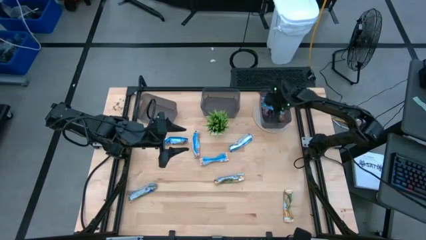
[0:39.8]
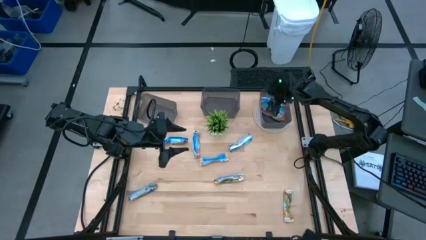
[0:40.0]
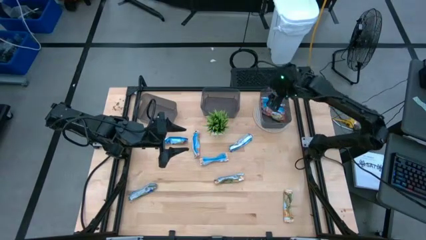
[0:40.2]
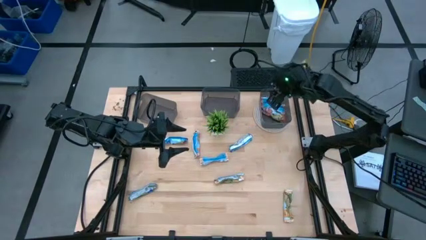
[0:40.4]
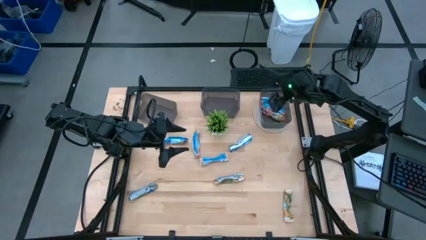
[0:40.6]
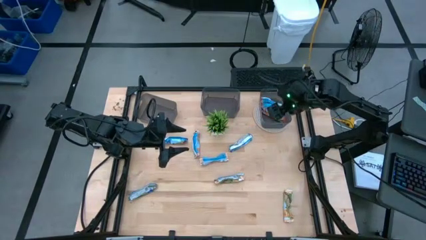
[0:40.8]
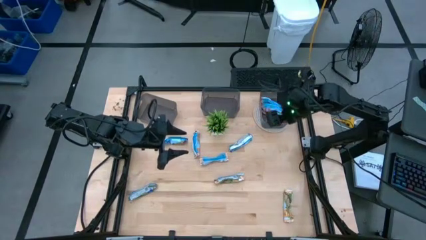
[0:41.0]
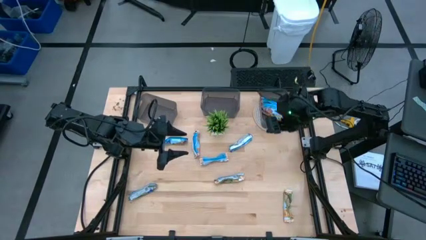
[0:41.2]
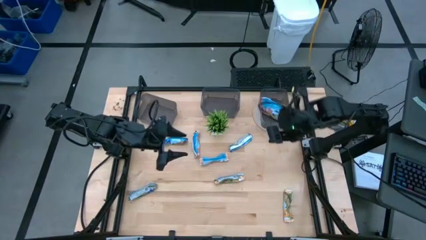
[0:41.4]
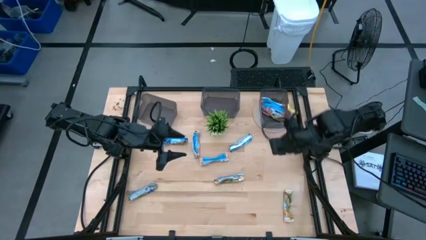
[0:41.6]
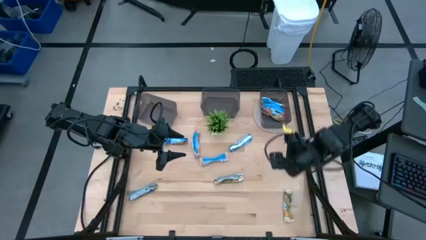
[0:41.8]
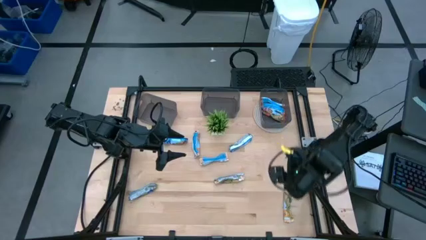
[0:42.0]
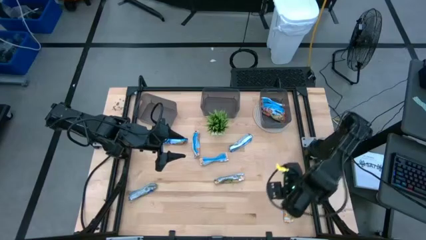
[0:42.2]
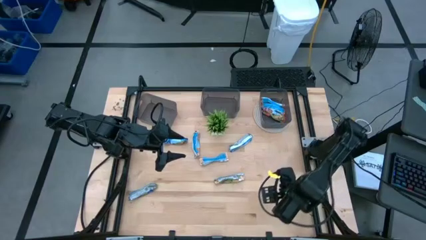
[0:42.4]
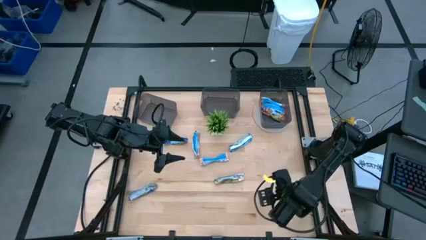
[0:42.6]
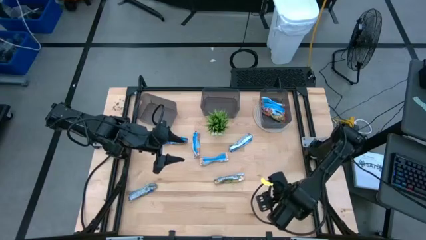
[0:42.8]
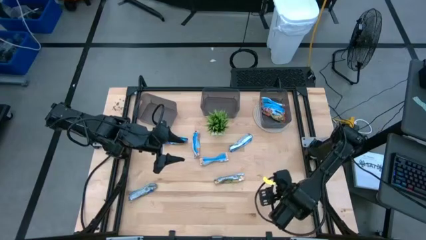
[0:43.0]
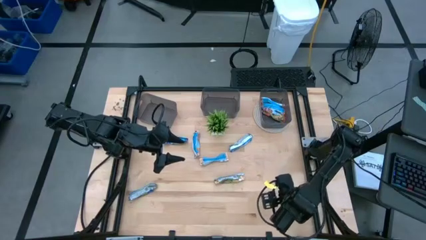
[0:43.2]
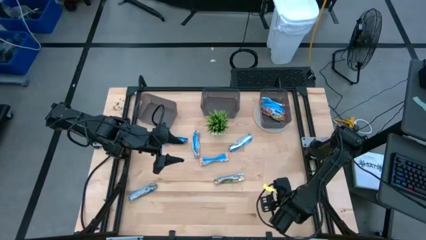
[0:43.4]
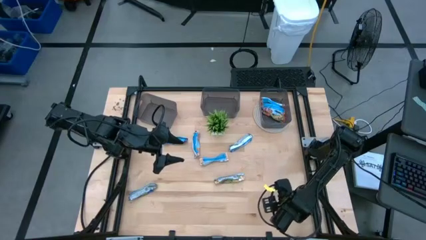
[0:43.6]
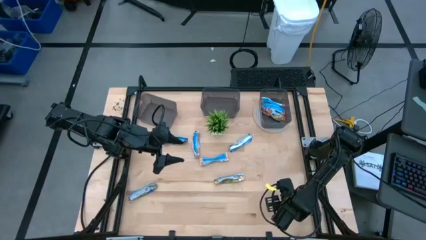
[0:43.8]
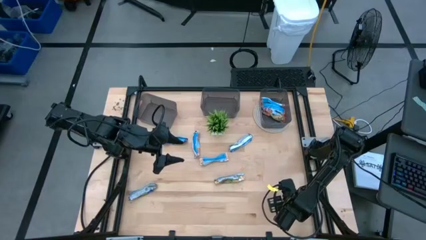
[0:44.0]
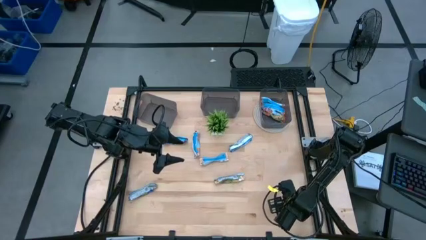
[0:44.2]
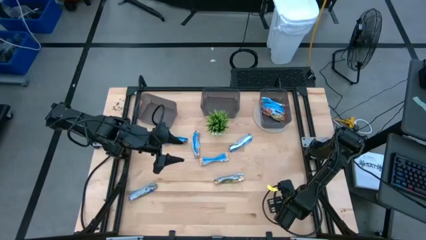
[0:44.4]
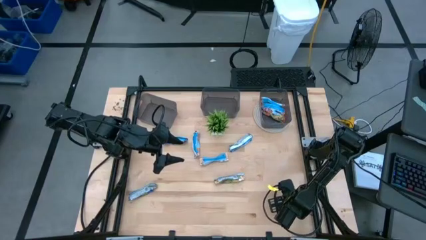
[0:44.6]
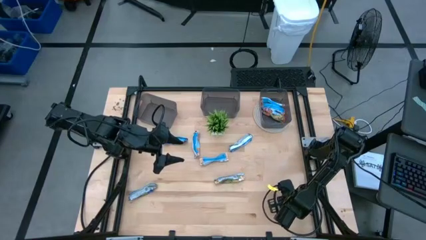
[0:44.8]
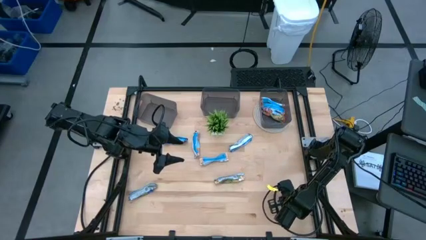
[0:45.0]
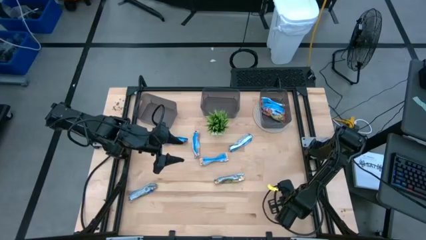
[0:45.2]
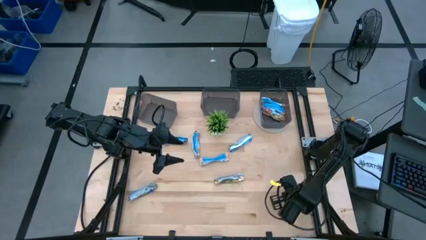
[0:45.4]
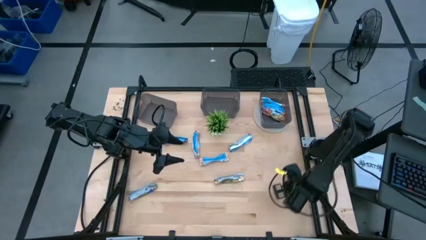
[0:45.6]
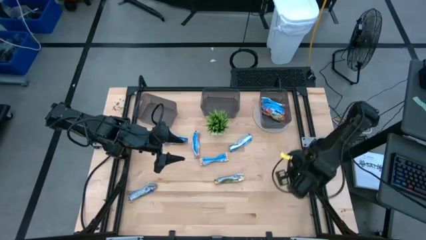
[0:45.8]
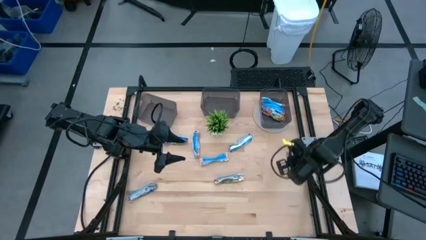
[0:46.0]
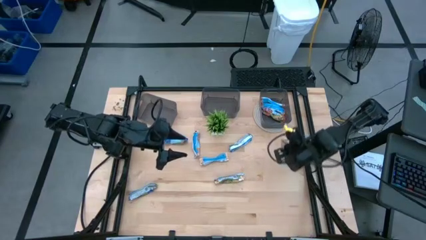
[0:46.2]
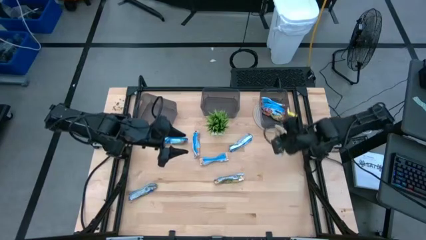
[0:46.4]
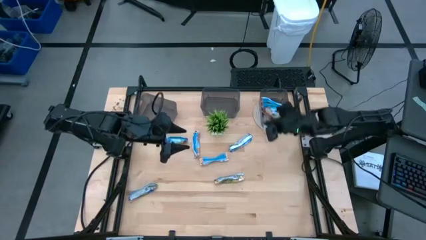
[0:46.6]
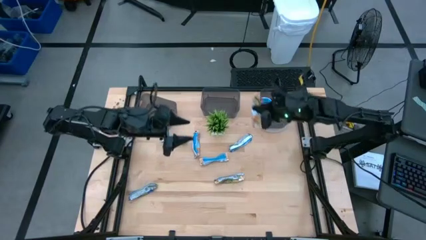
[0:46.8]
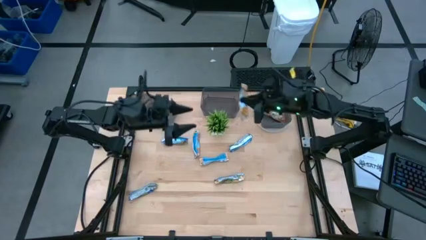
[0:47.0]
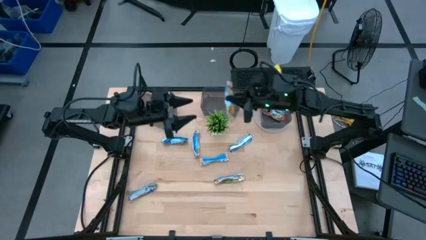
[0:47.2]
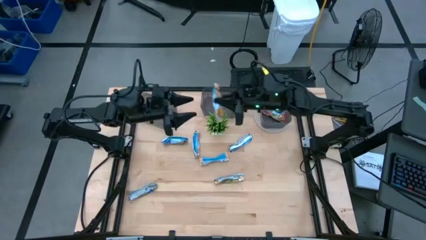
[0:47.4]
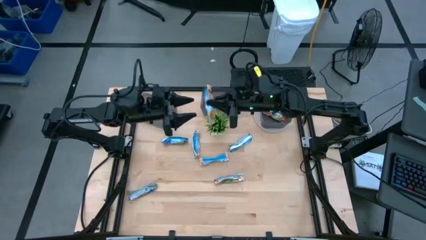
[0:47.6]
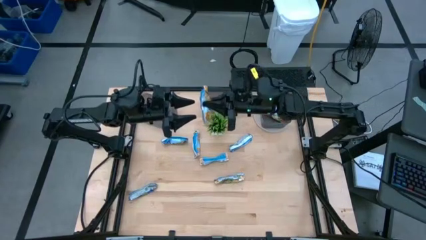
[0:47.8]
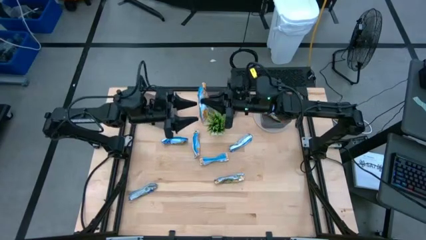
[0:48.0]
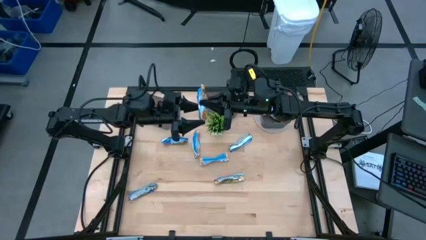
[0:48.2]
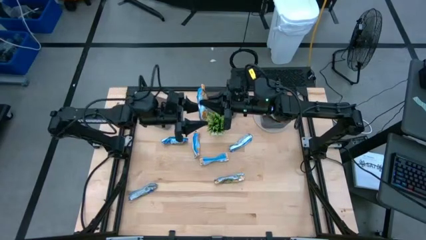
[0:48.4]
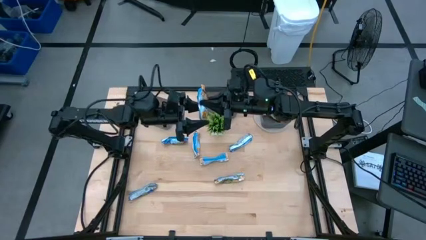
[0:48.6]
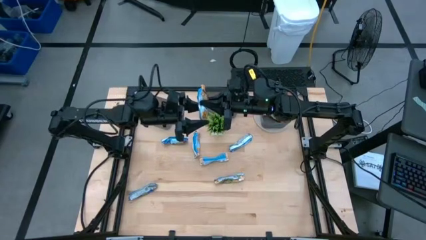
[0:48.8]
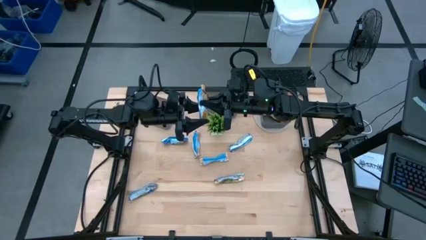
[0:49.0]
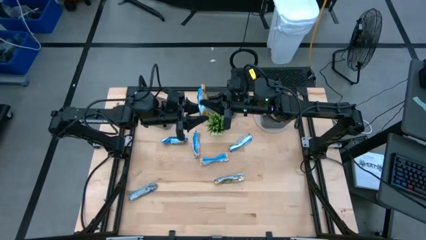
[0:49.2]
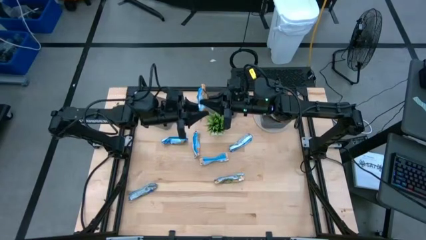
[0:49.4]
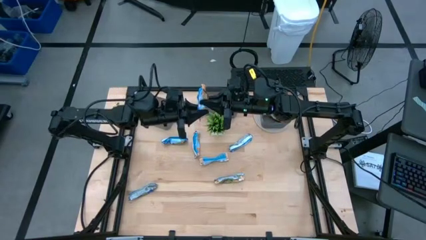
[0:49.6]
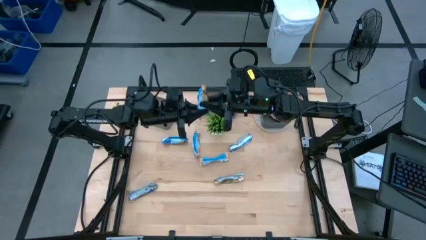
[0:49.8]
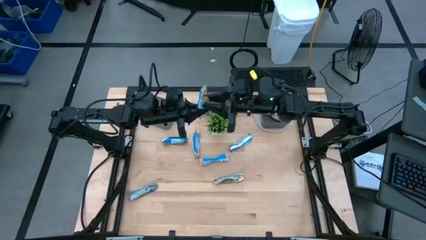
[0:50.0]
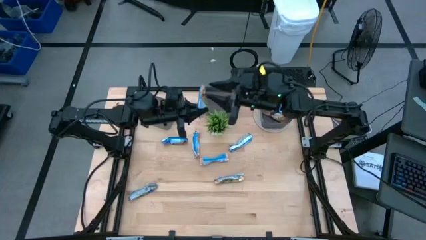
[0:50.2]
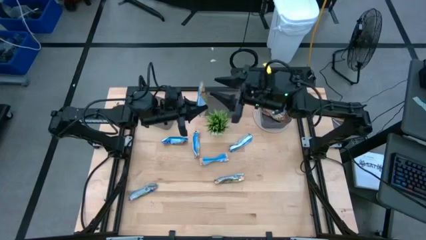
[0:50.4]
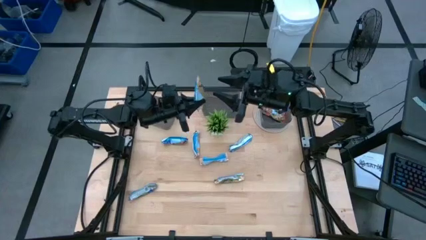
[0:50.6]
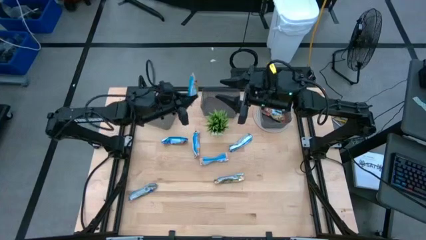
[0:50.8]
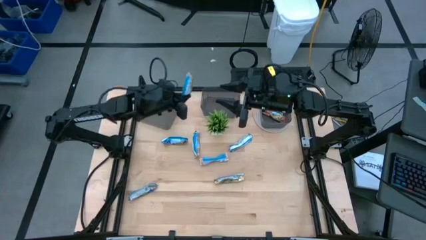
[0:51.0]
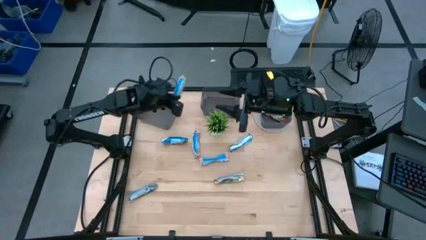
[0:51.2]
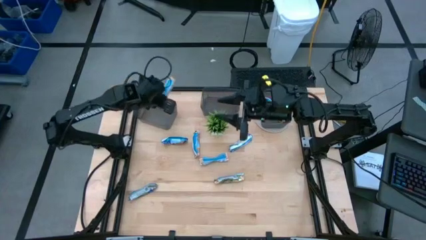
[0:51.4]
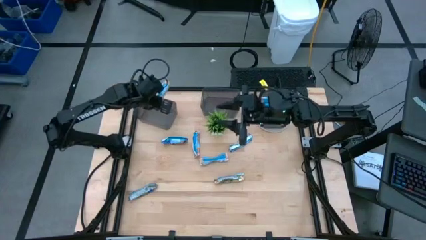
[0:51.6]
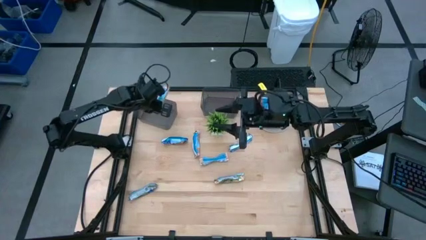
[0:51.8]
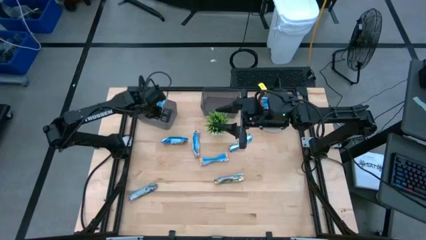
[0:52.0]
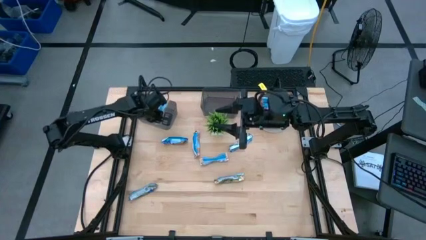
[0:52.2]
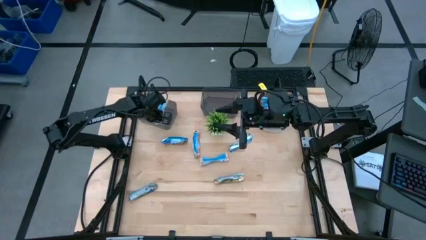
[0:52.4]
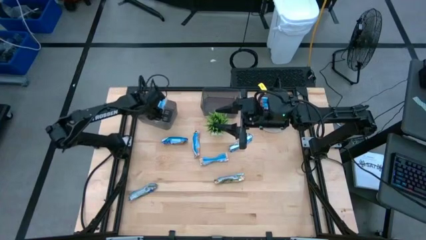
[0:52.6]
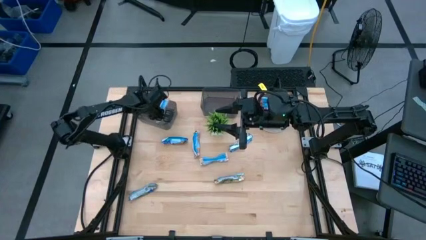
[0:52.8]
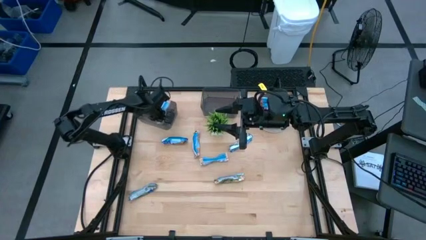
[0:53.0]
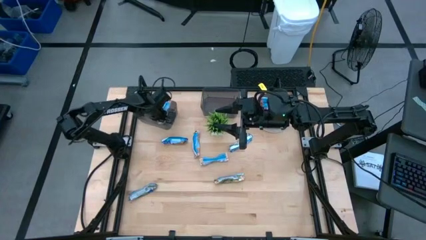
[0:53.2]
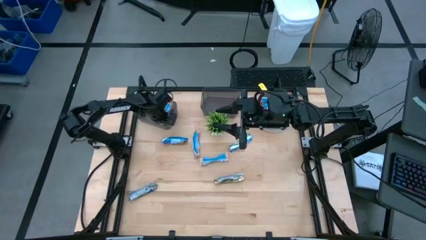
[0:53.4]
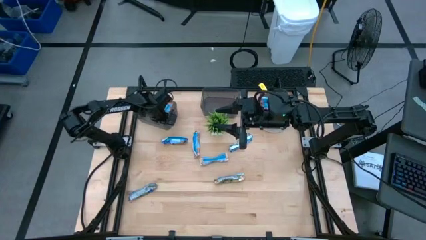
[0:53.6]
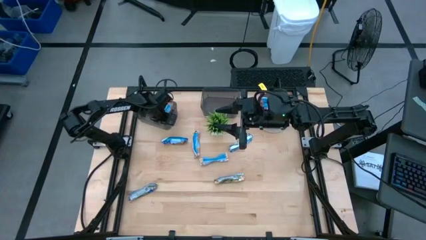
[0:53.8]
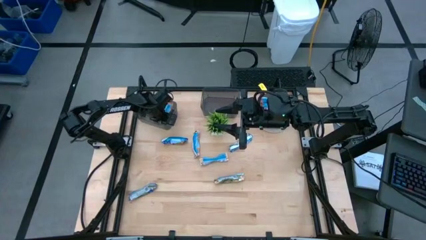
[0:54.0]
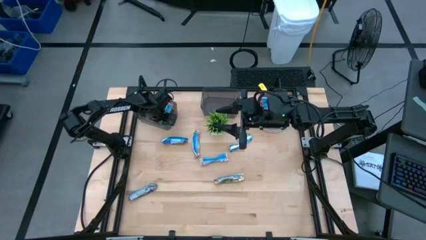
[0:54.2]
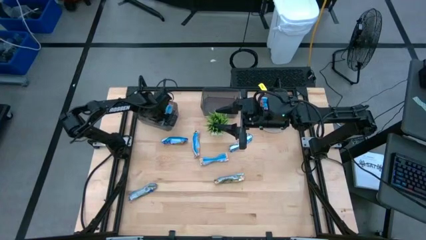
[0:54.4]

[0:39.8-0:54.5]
Task: Pick and place Granola Bars by type
Put the yellow granola bar into the left black bin
